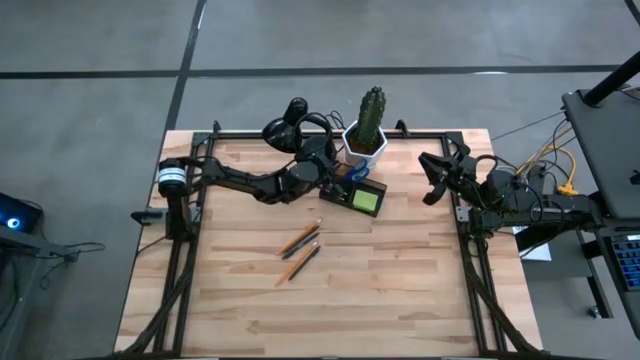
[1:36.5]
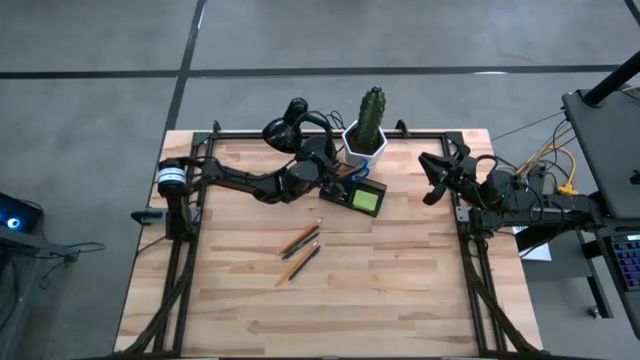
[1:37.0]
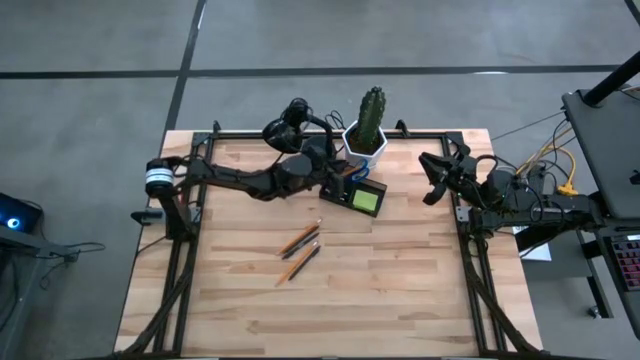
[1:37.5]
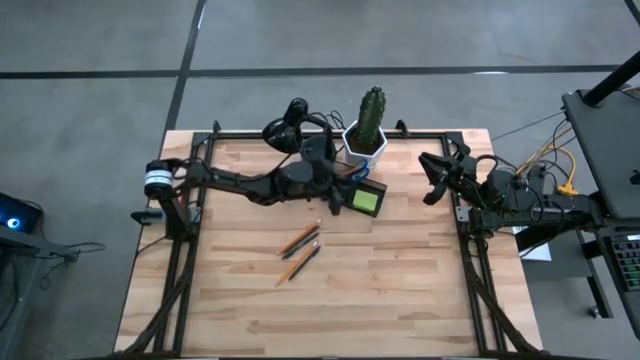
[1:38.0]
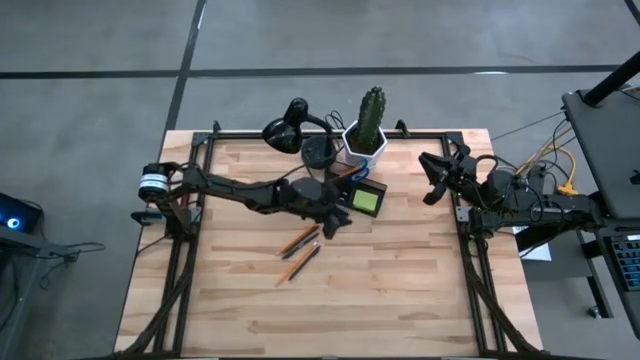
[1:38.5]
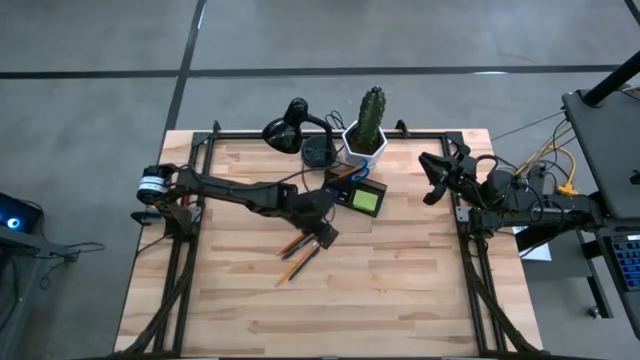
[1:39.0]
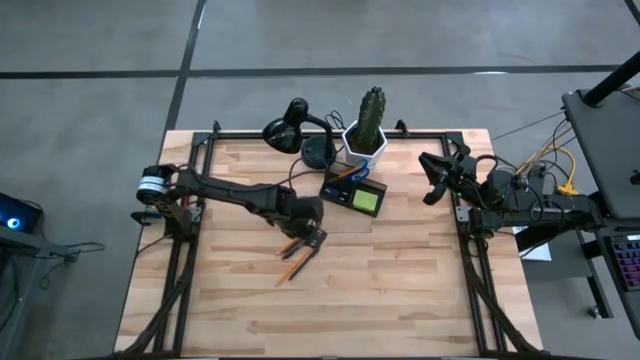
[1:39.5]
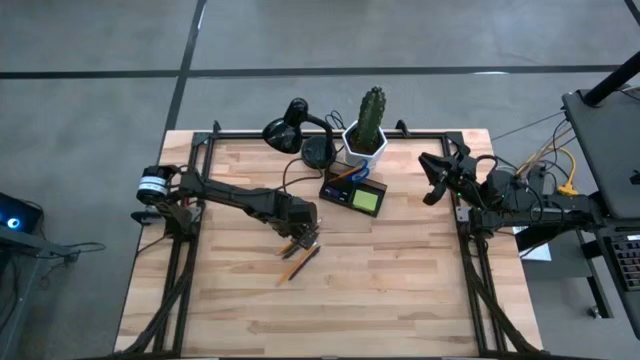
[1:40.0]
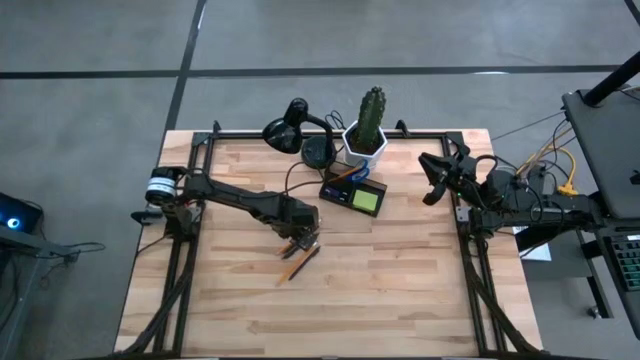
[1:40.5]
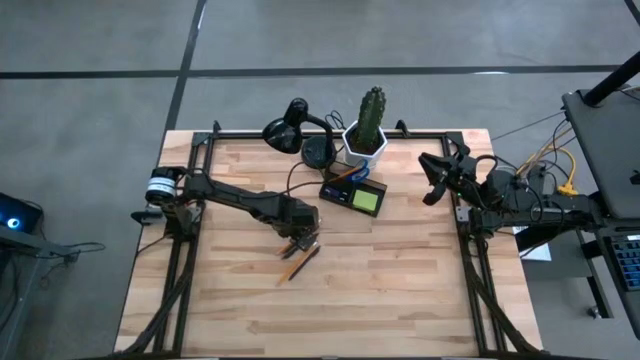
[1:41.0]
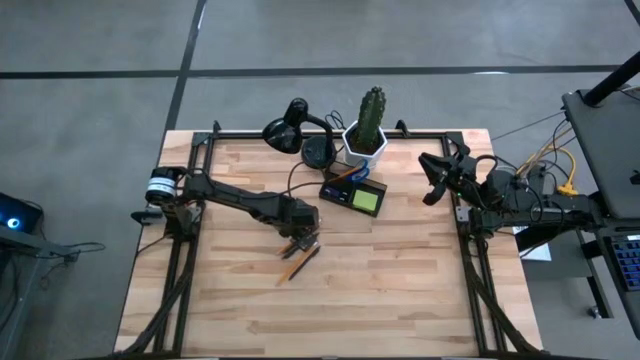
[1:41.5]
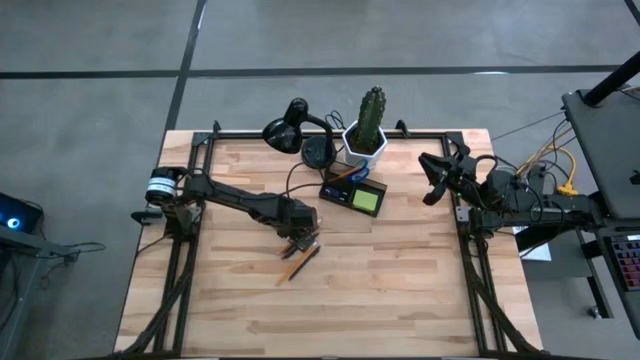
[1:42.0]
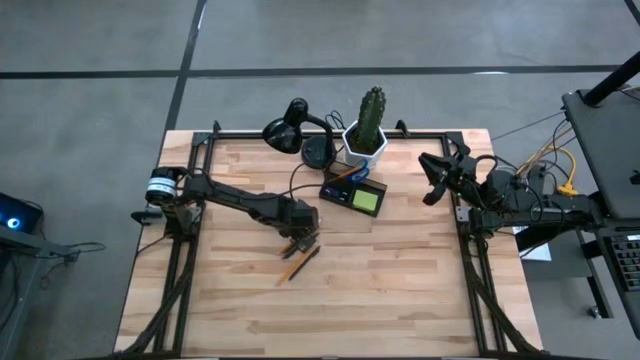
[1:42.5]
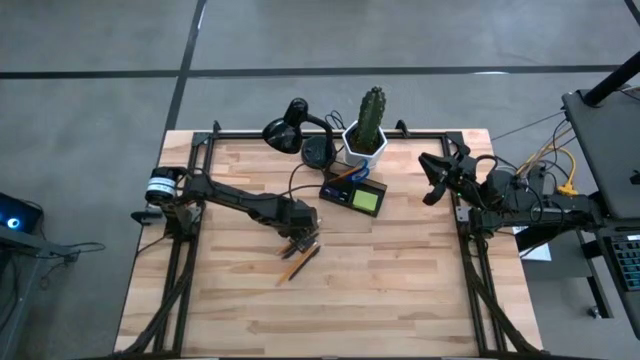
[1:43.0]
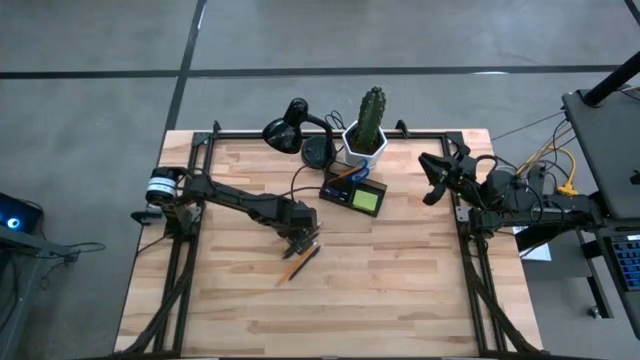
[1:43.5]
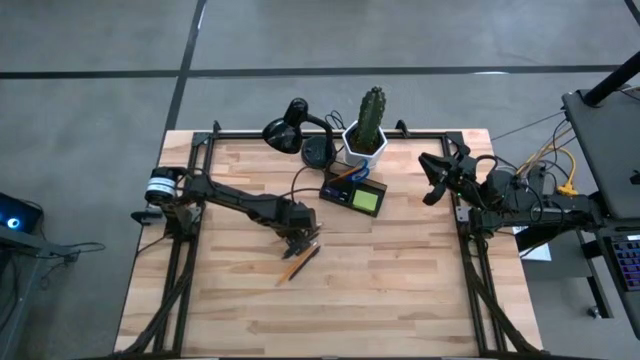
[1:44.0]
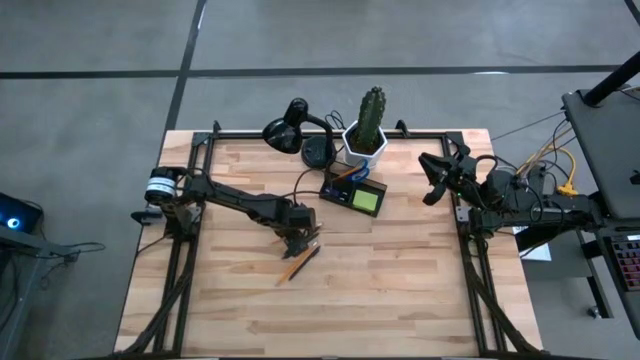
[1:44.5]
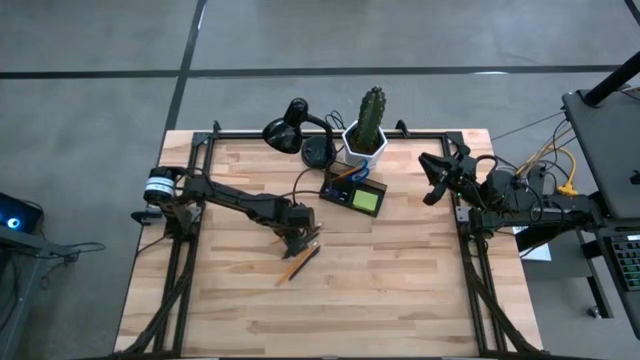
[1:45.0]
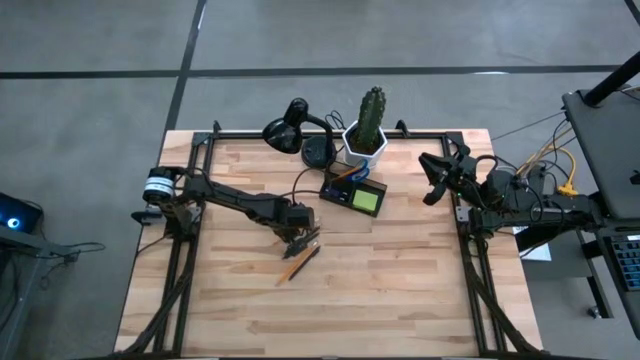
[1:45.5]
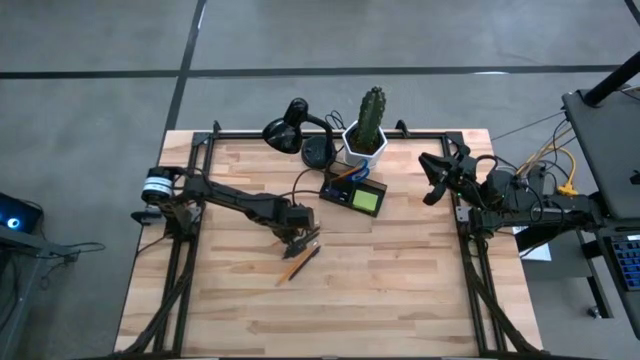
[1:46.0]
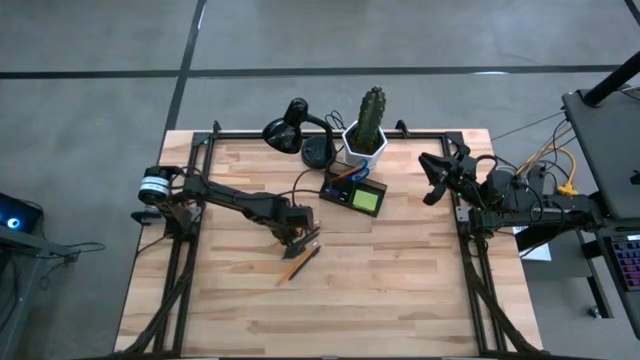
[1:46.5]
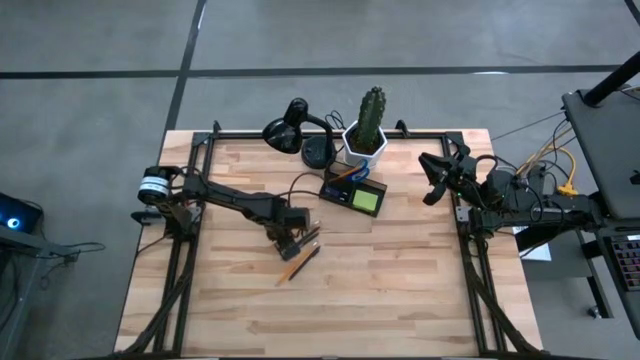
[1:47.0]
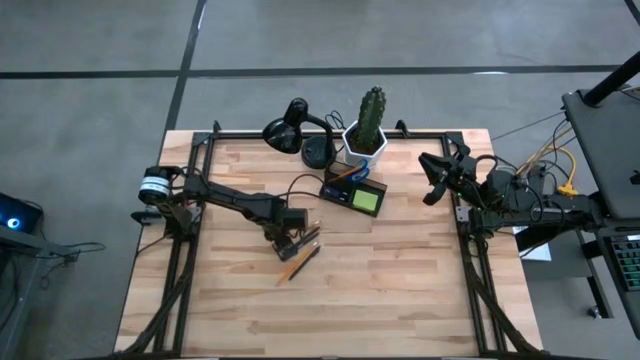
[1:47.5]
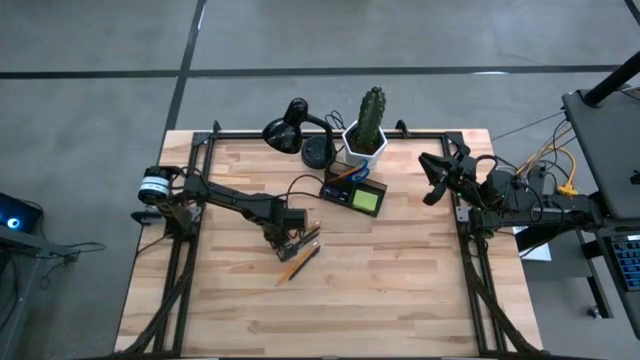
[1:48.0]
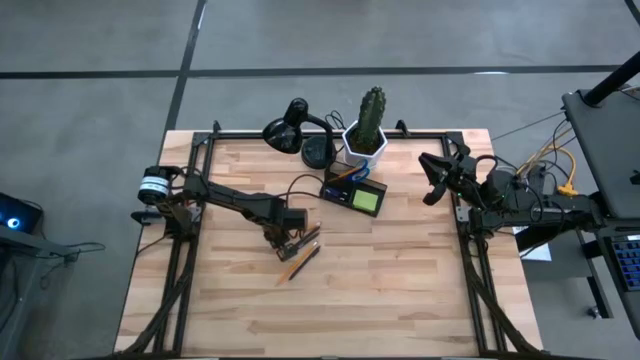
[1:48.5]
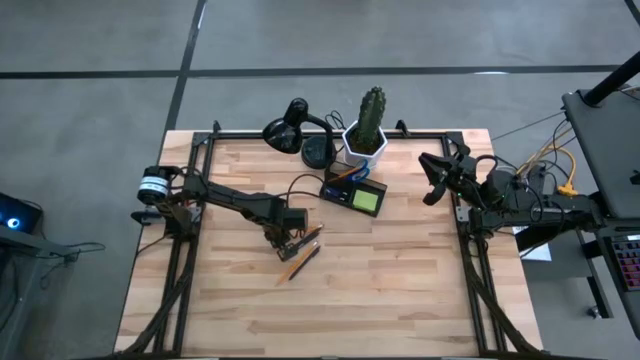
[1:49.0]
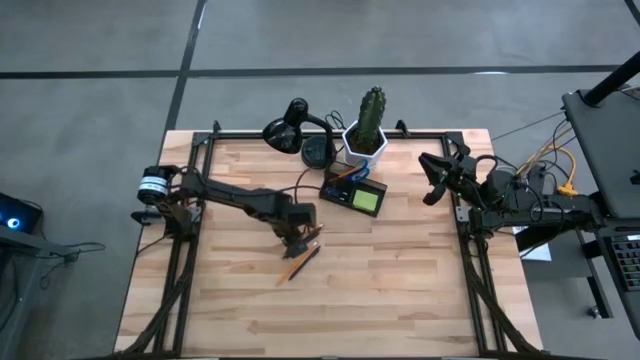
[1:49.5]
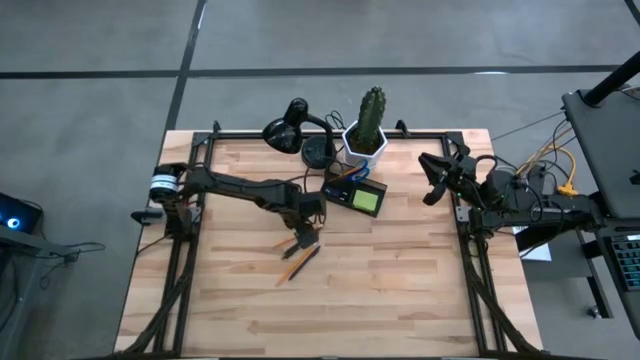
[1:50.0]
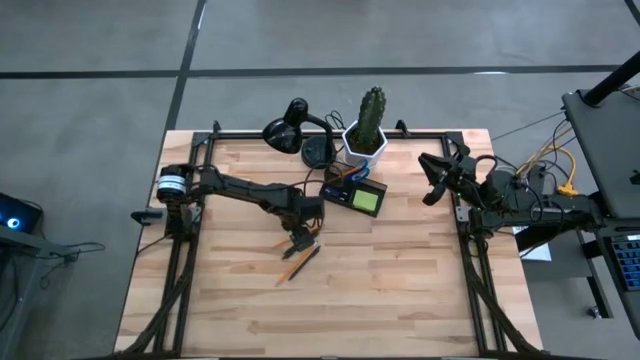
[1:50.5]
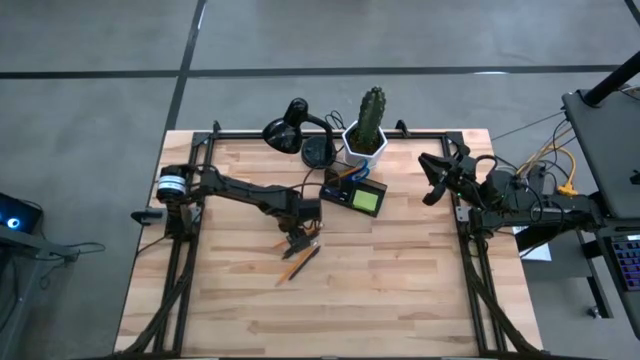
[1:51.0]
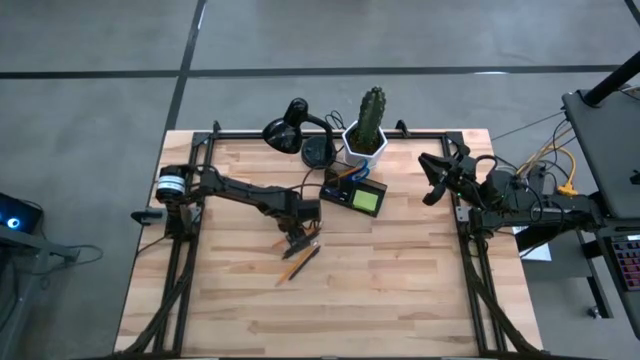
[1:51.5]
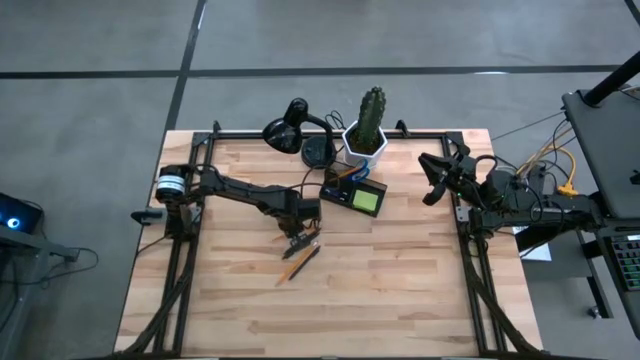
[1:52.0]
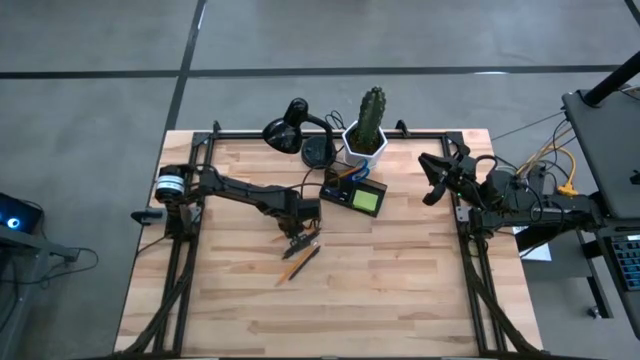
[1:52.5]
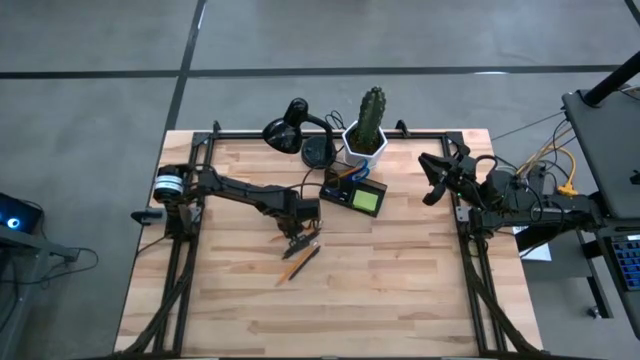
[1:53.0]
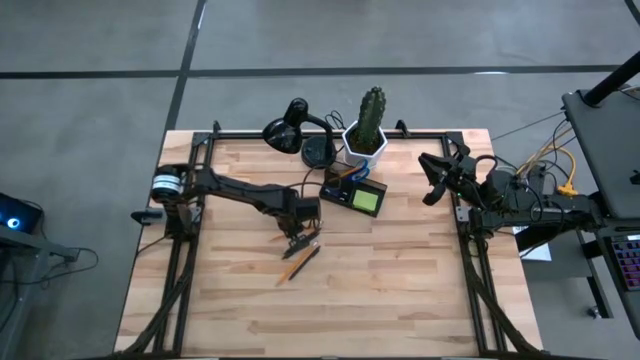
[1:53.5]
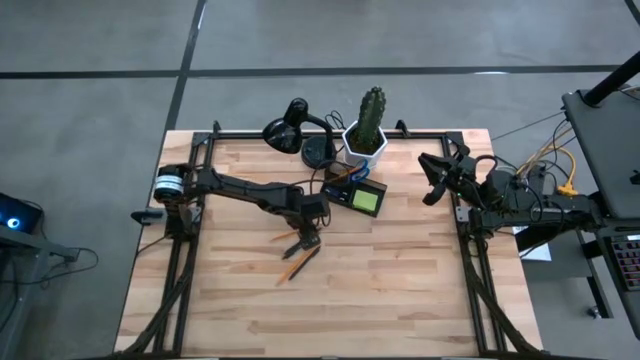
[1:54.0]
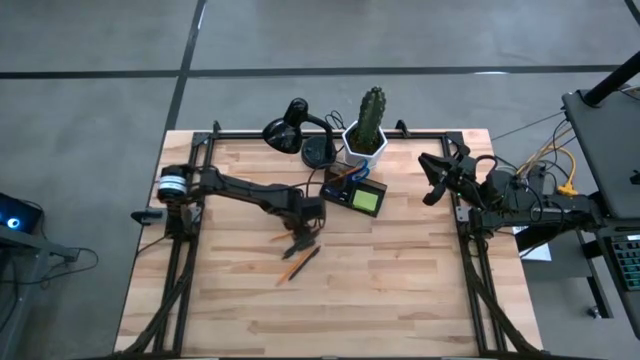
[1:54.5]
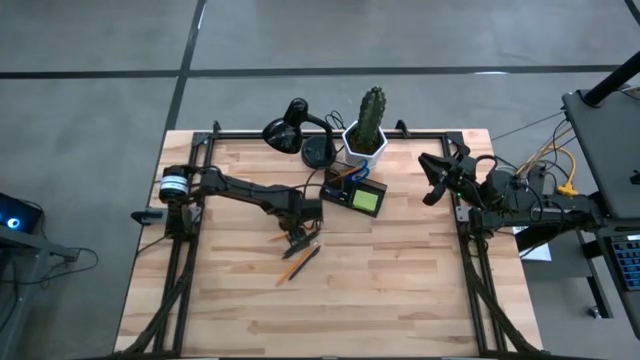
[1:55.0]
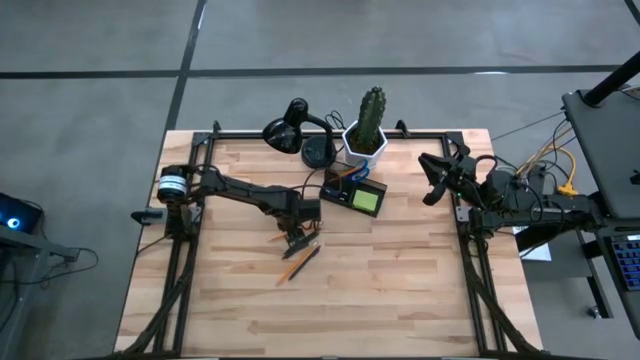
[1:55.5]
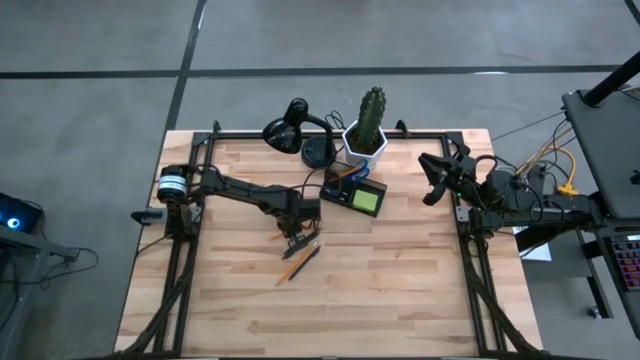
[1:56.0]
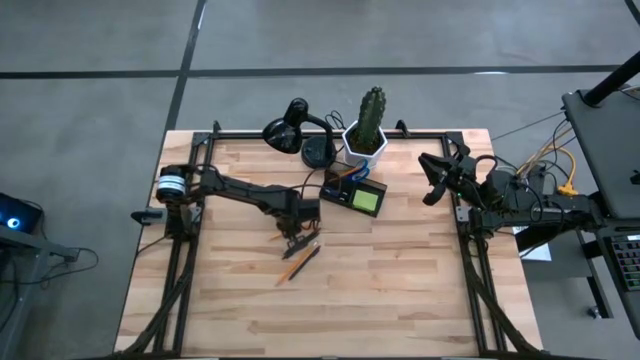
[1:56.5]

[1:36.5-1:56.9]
Task: Pick and place office supplies into organizer
Put the top orange pencil into the black desk organizer
